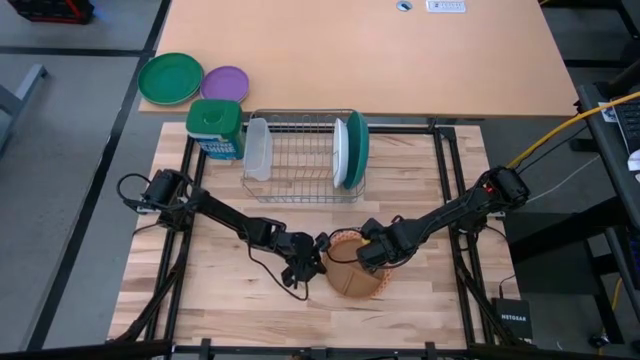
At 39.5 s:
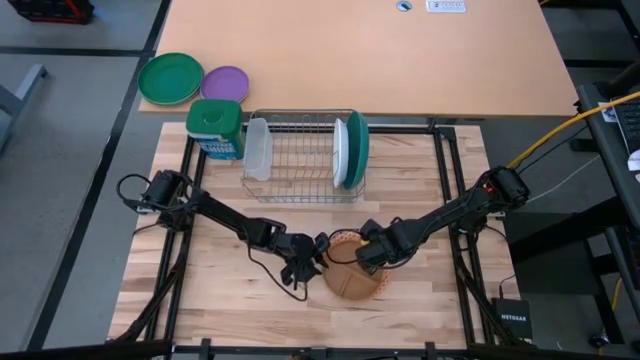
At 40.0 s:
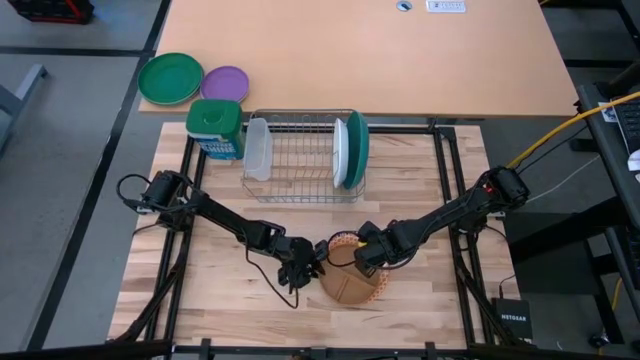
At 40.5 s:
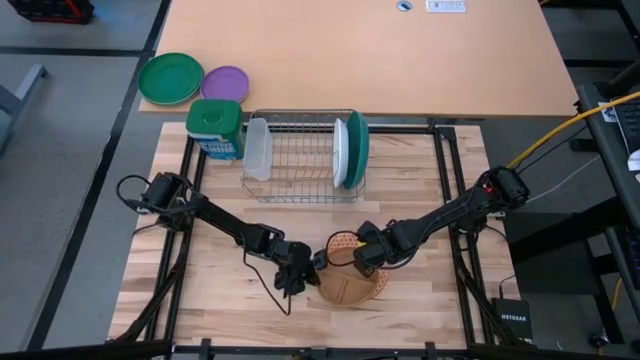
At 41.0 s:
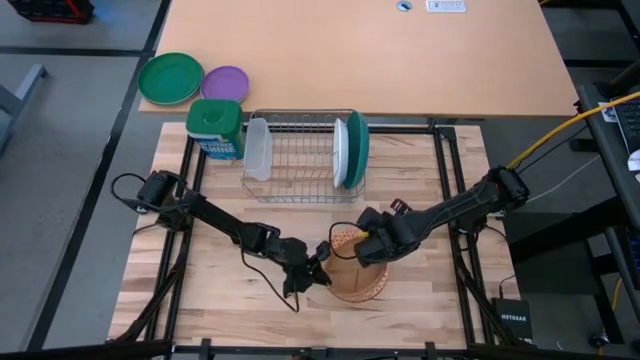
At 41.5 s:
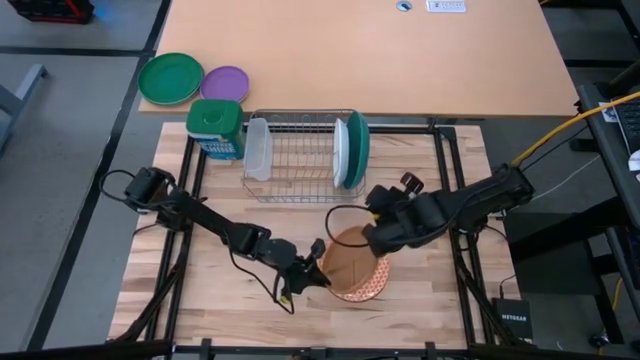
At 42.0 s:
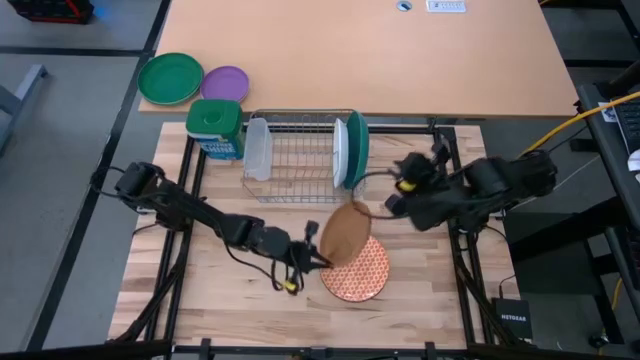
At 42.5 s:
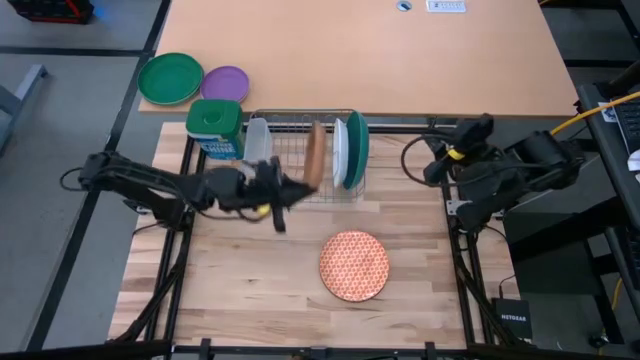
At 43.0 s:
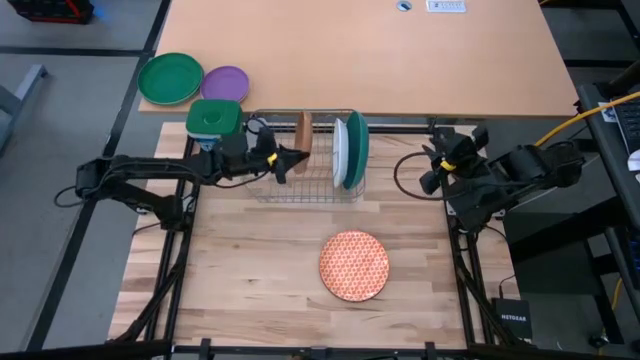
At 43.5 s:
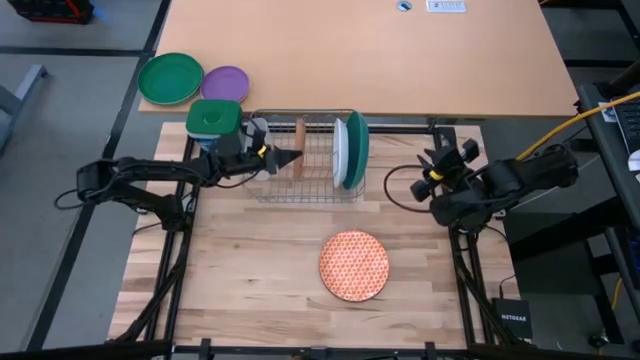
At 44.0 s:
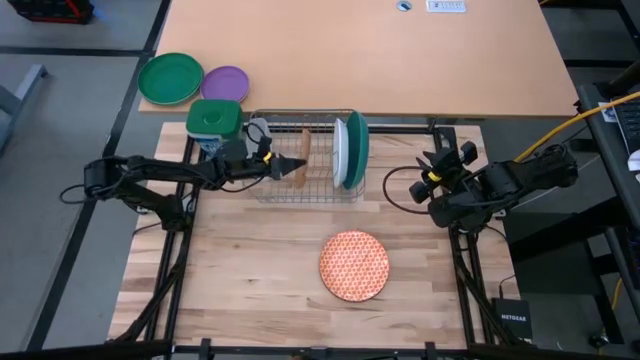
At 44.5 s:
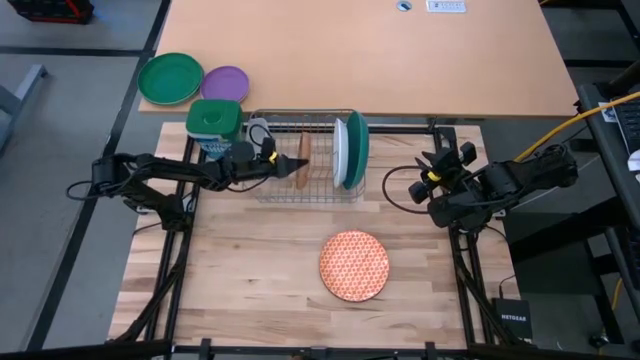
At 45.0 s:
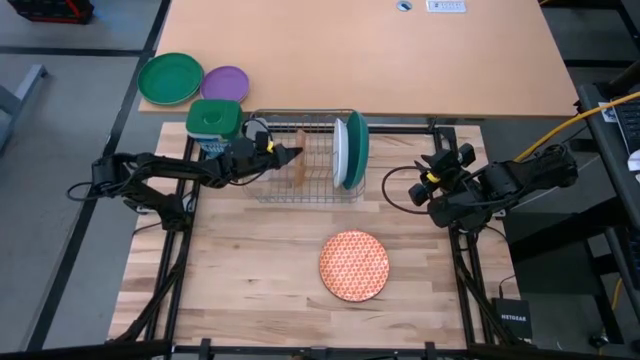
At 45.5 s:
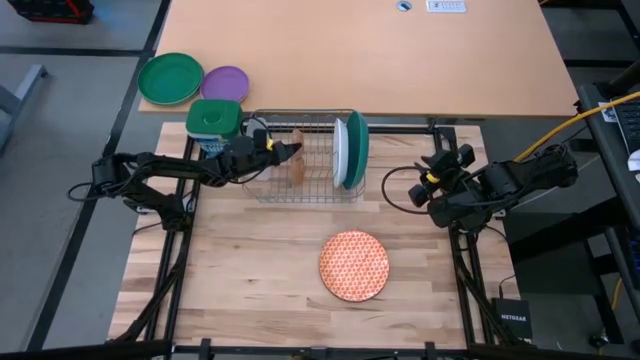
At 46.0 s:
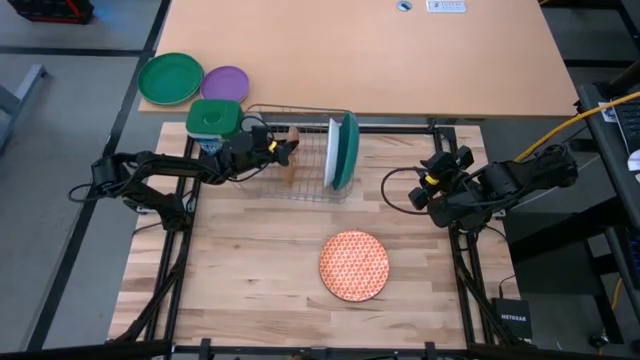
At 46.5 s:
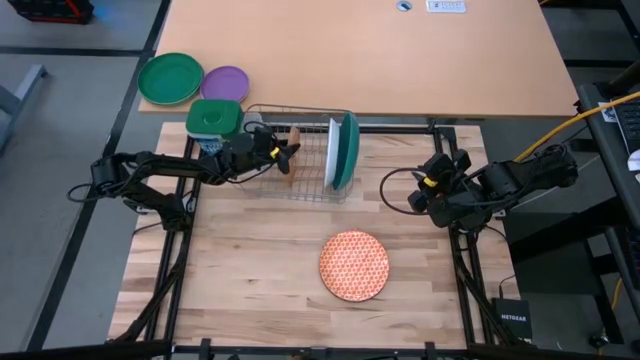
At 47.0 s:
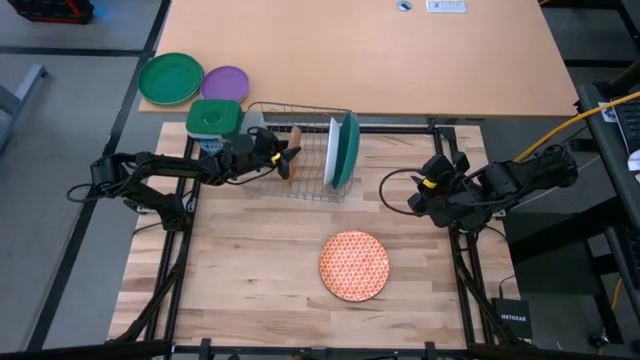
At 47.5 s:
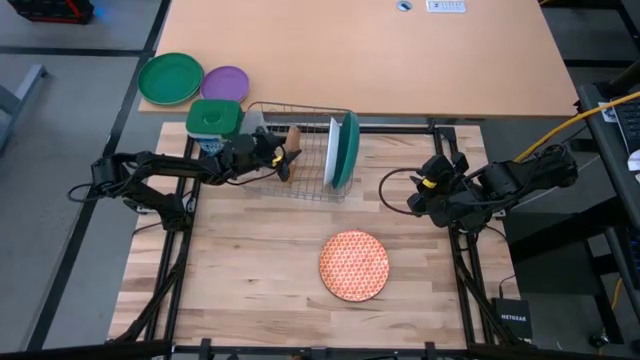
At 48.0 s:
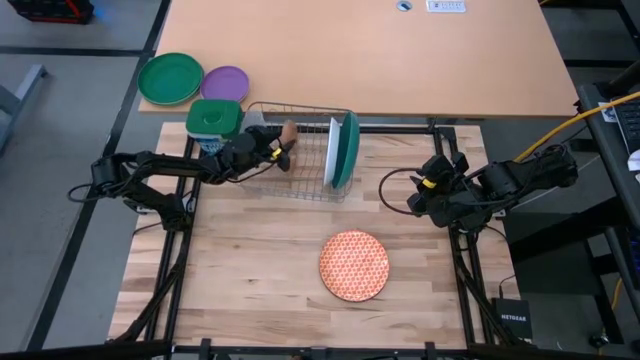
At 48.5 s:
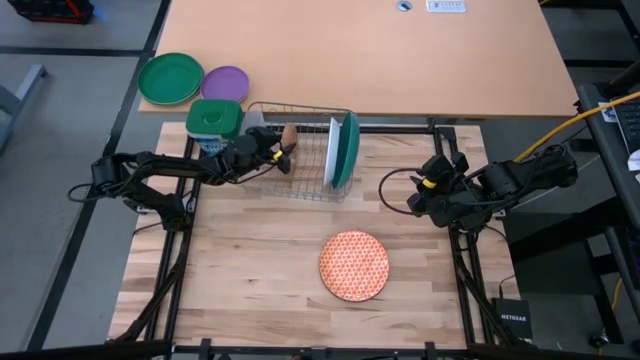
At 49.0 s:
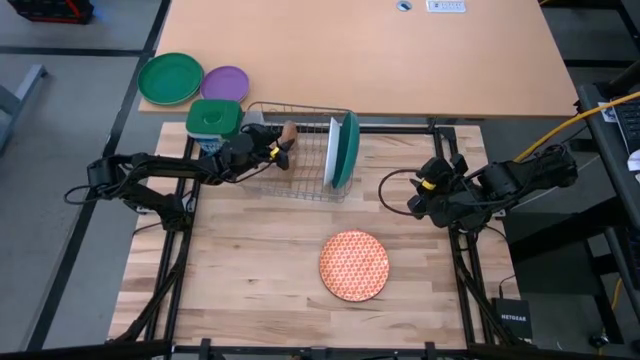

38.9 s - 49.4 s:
Task: Sort dishes
Put the brown plate in the dish rack

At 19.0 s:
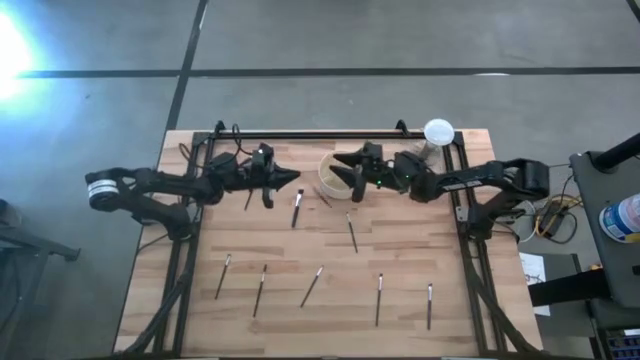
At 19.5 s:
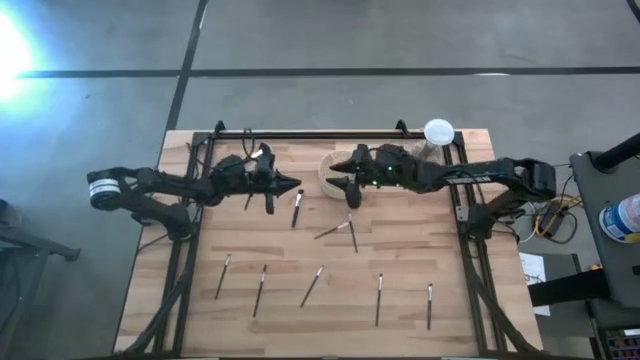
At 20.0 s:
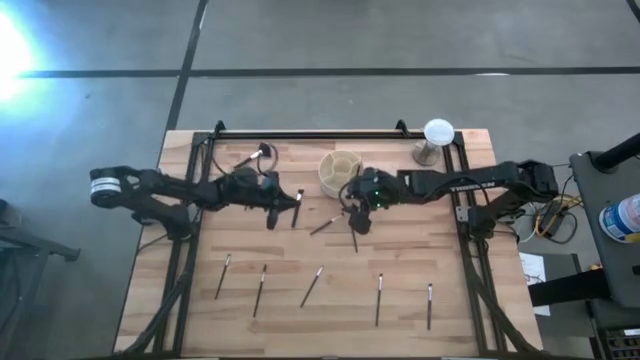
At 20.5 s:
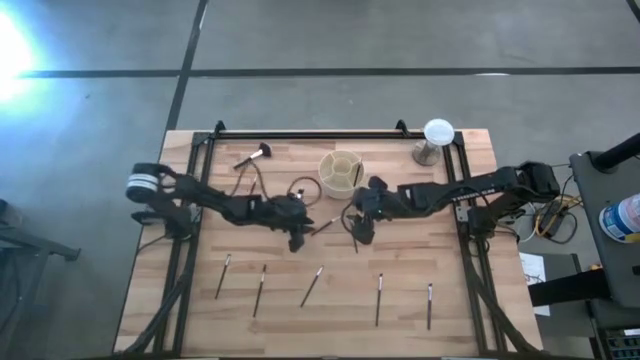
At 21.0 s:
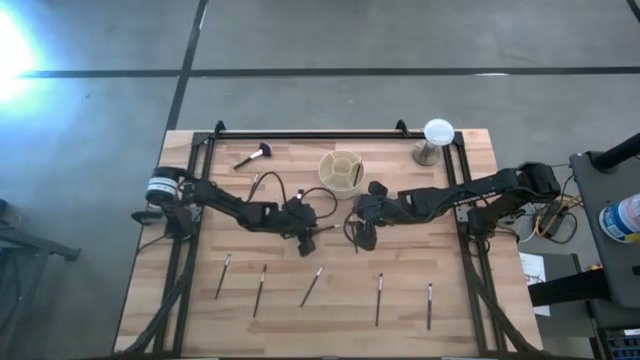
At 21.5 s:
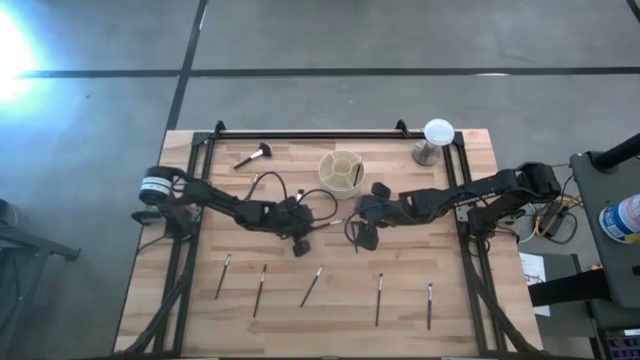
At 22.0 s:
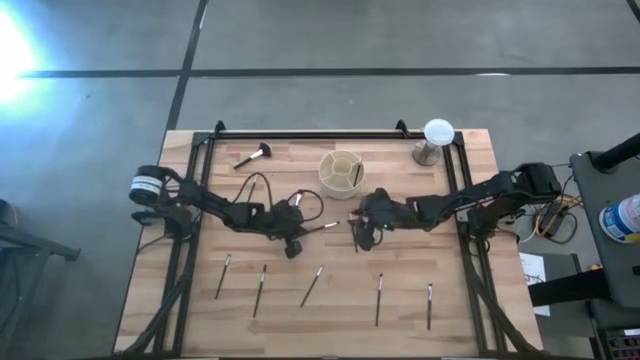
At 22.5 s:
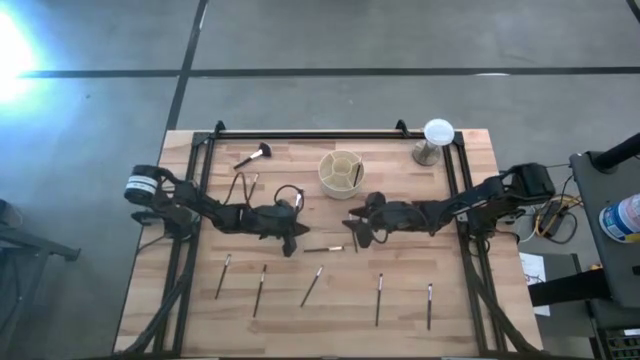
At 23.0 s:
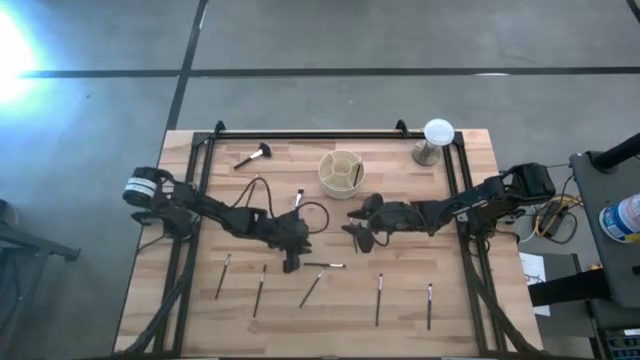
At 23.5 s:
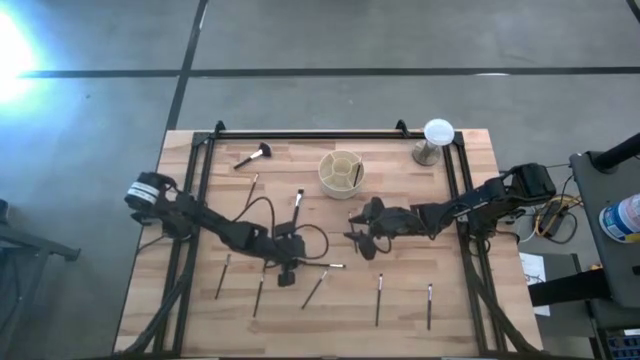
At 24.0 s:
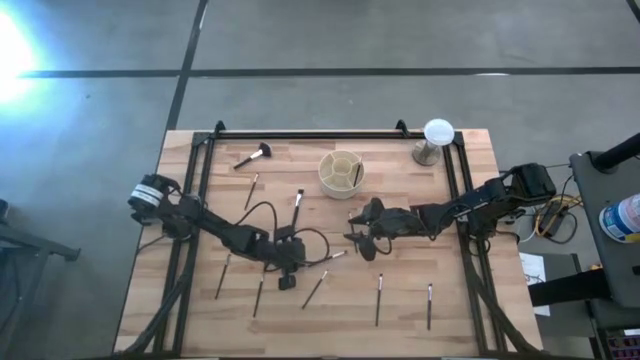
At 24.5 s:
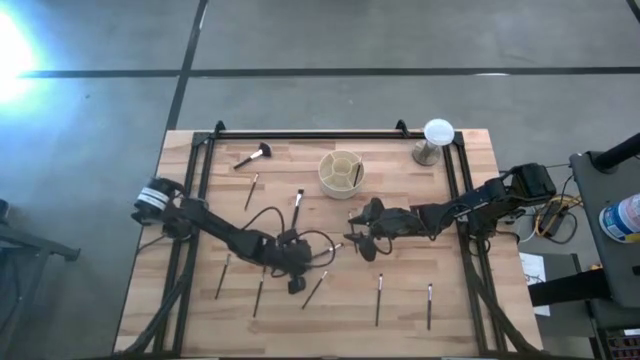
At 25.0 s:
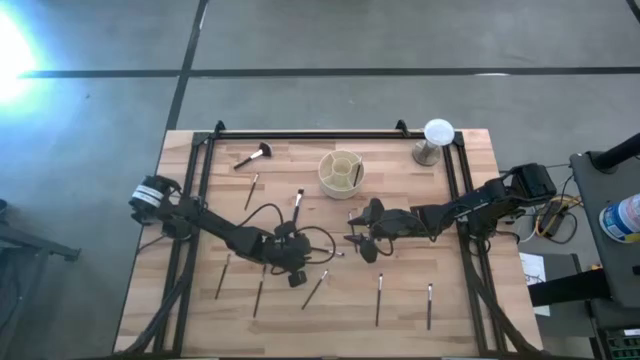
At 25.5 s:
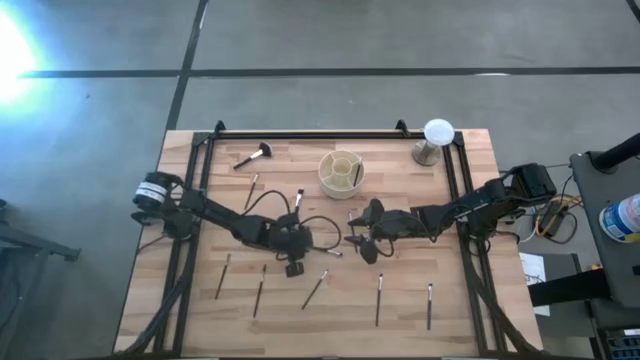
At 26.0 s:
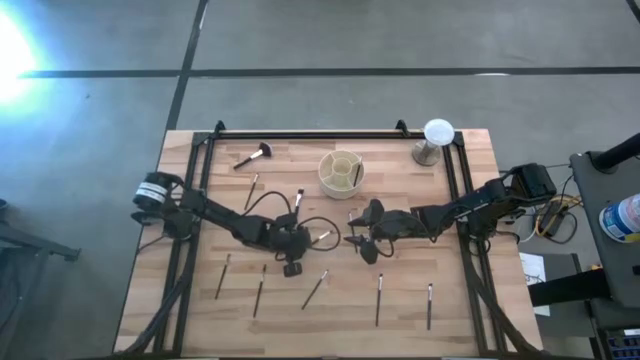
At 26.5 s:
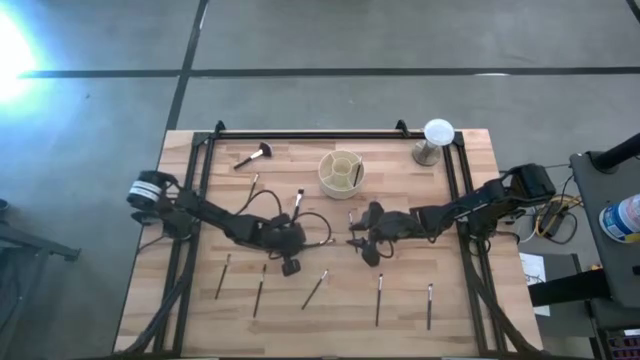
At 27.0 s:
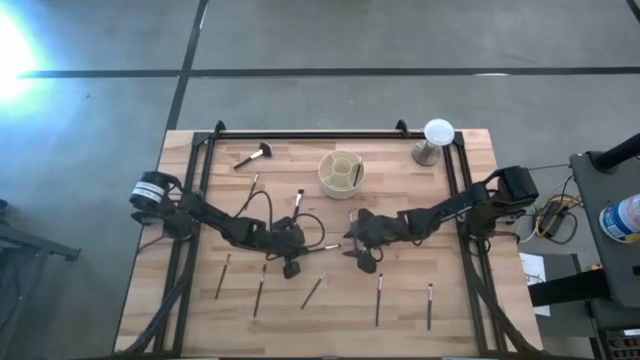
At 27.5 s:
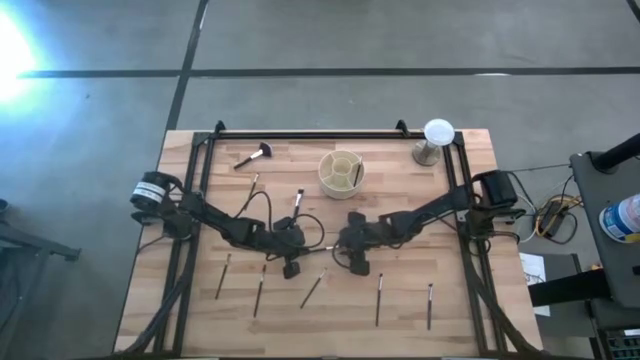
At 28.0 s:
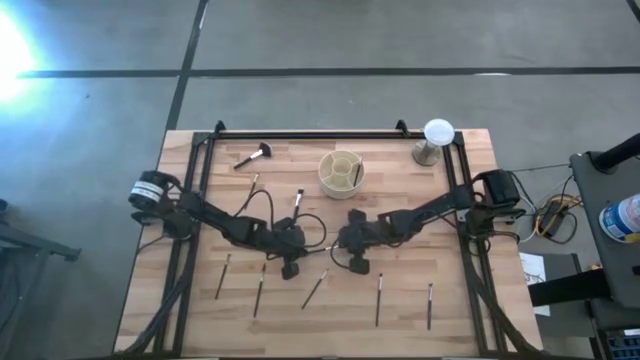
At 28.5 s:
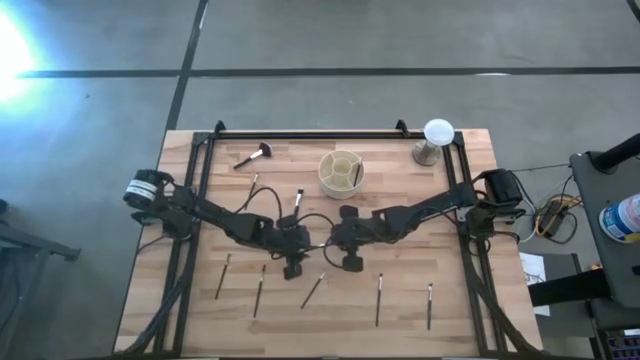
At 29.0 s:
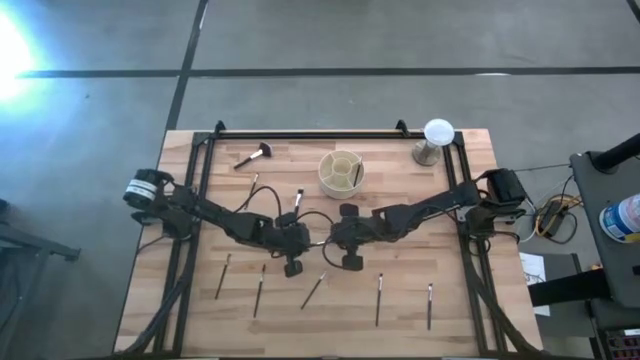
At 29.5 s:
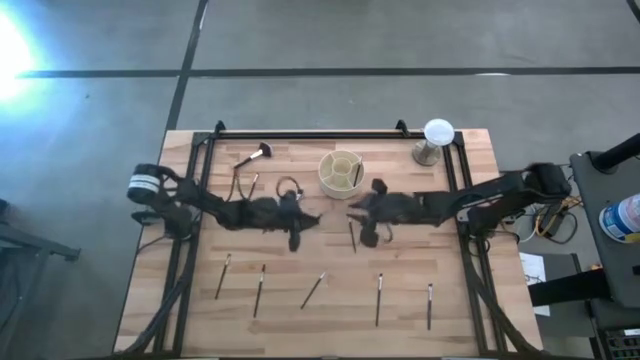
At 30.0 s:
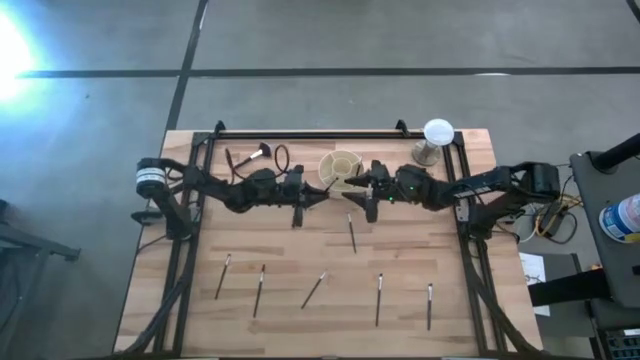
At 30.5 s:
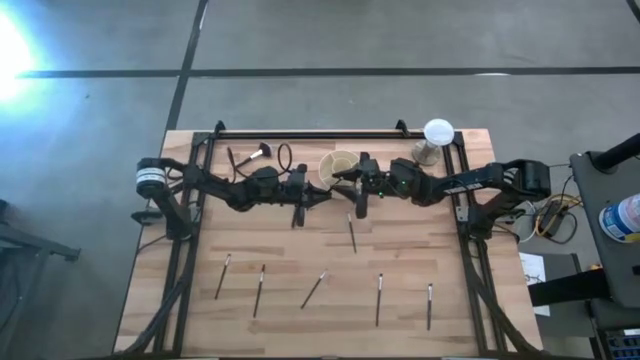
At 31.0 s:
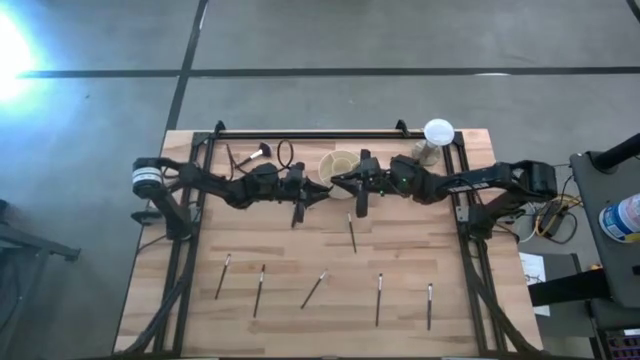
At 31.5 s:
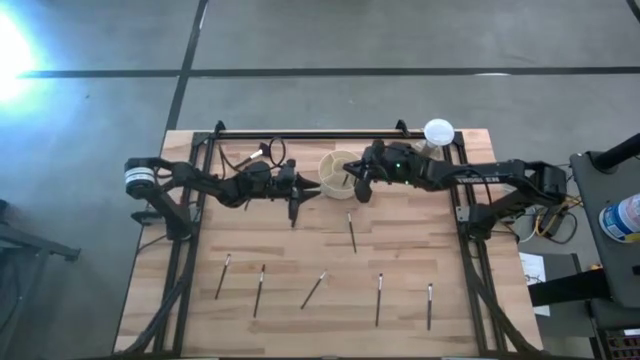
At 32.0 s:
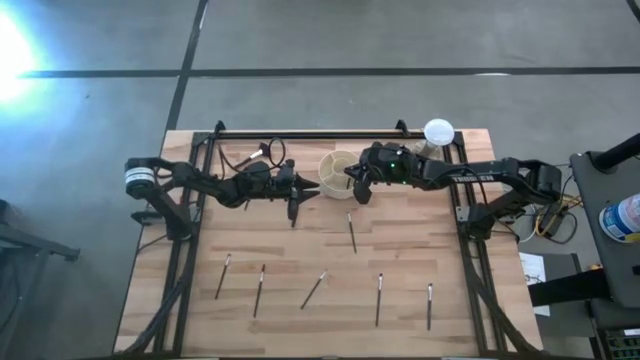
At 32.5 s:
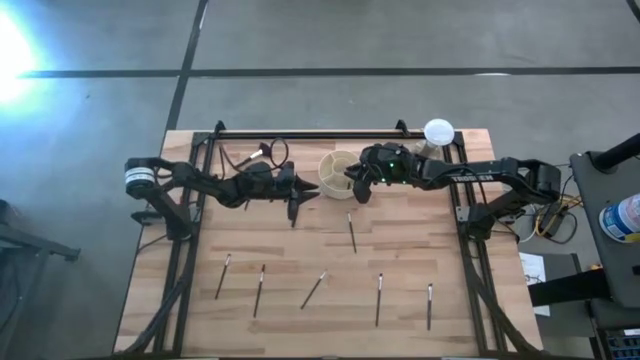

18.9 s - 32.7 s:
Task: Put items in baskets/containers
Put the black silver eyeshadow brush into the pen organizer
